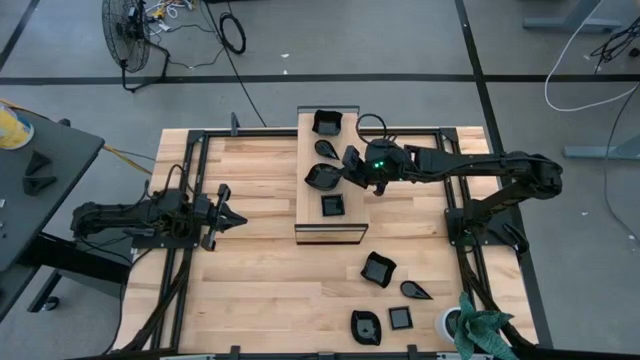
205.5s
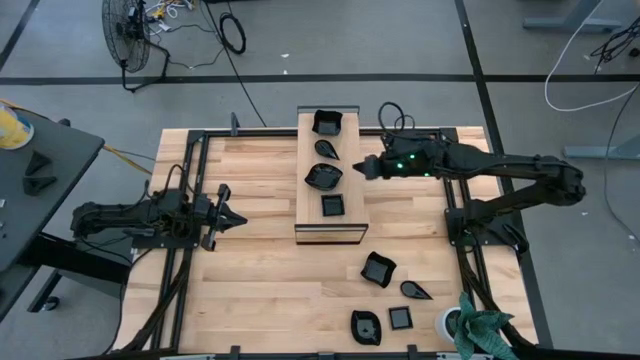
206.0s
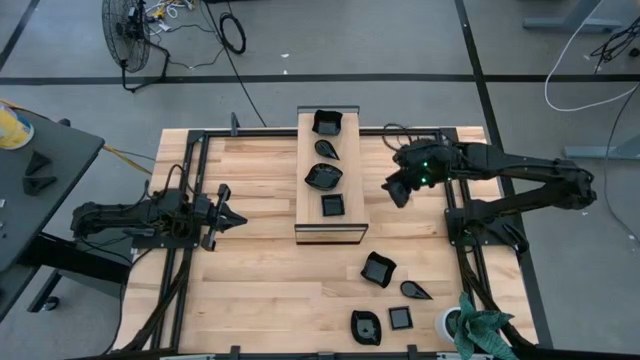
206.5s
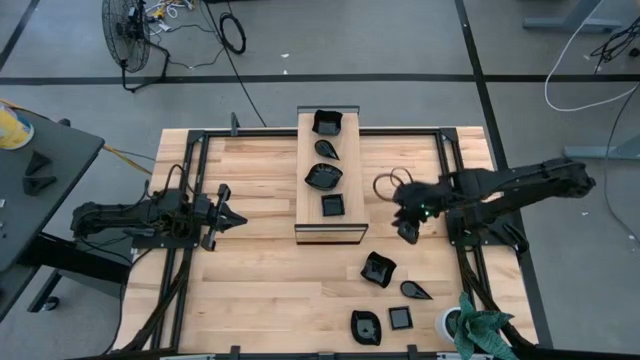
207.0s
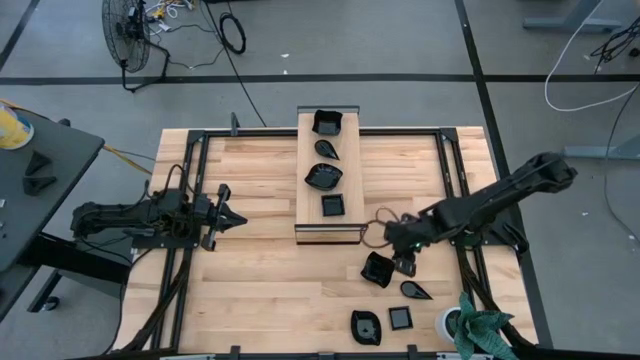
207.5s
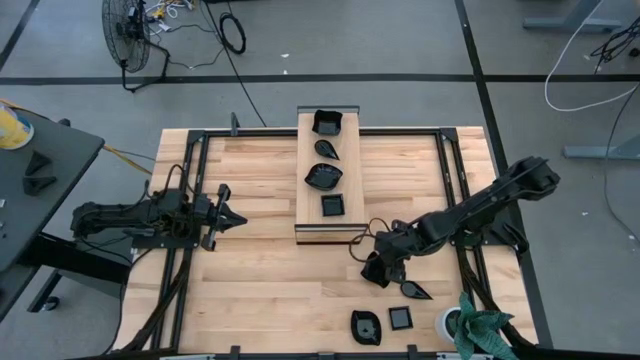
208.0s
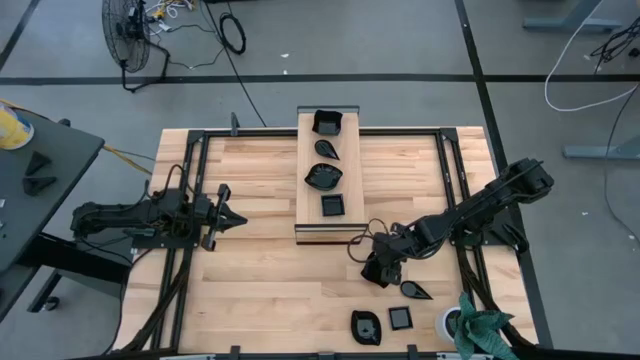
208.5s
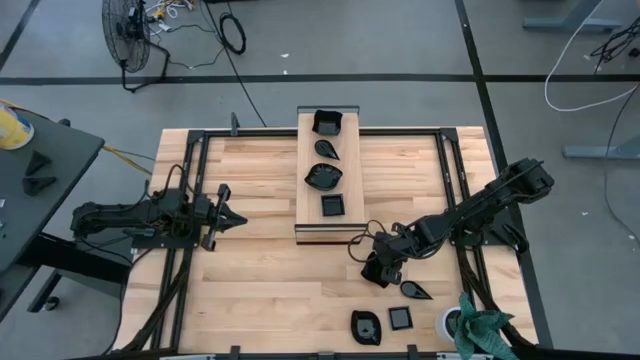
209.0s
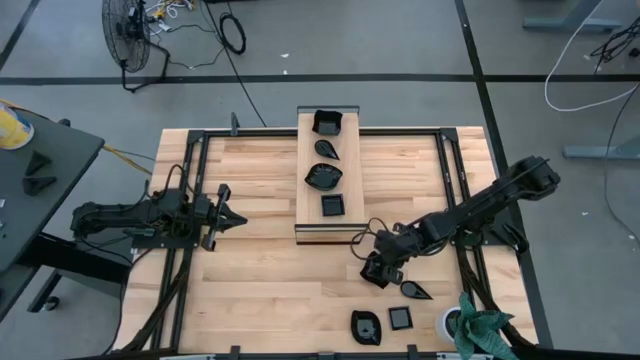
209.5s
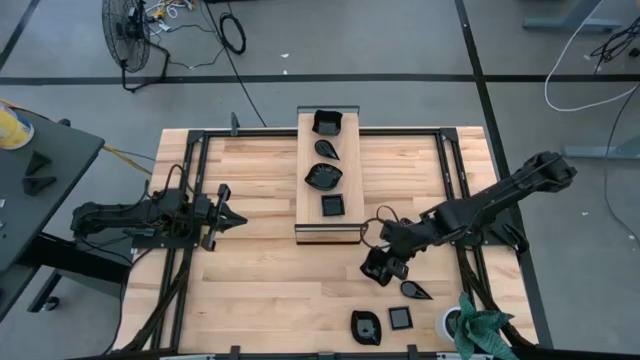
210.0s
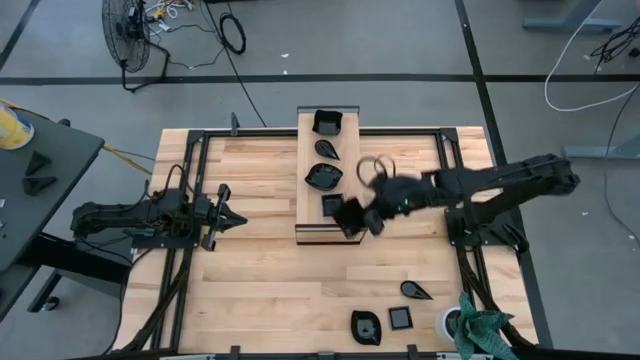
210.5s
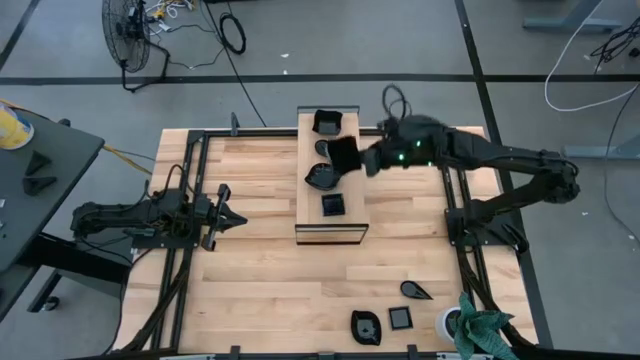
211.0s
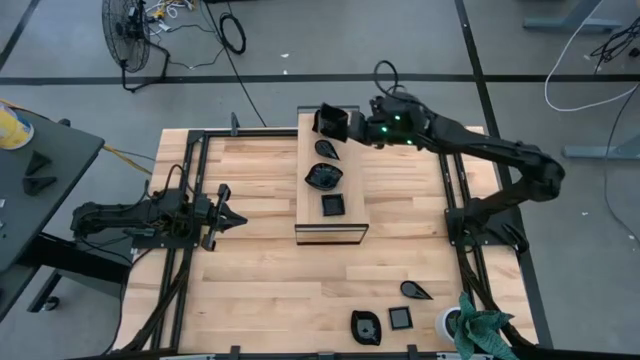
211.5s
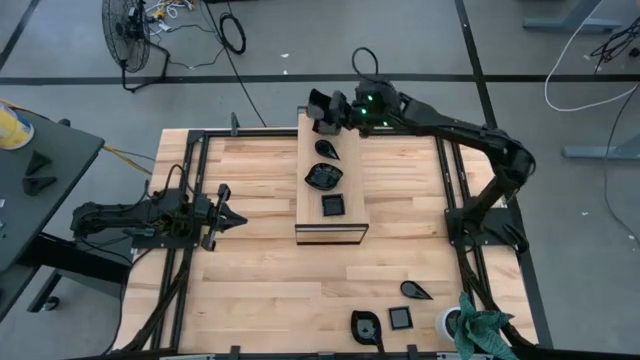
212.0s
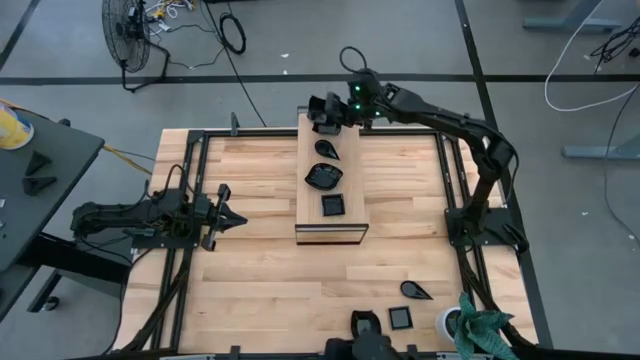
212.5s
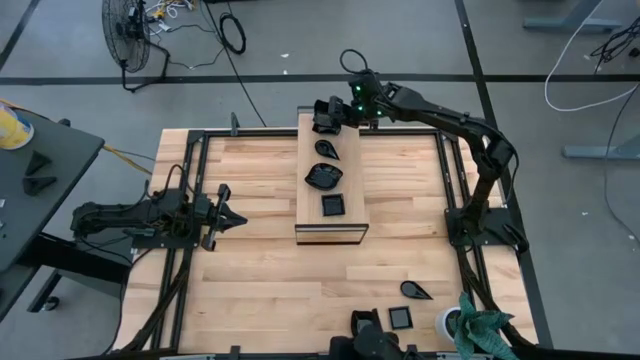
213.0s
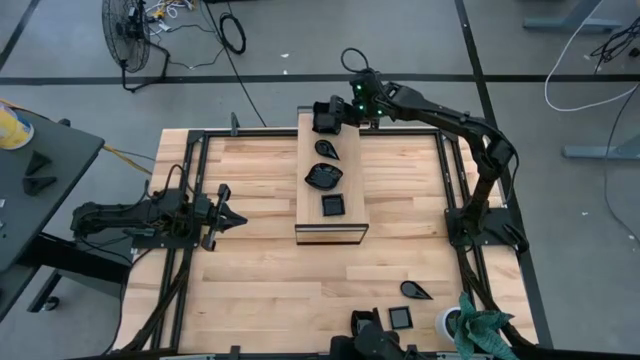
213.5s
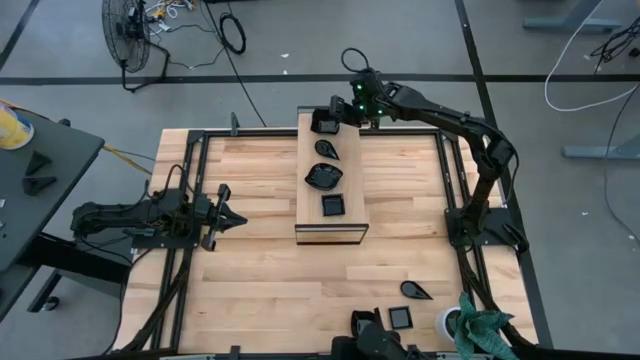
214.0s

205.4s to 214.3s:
Task: Pick & Place Mini shaped plates
Stack the distorted square plate on top of the distorted square plate on the shelf

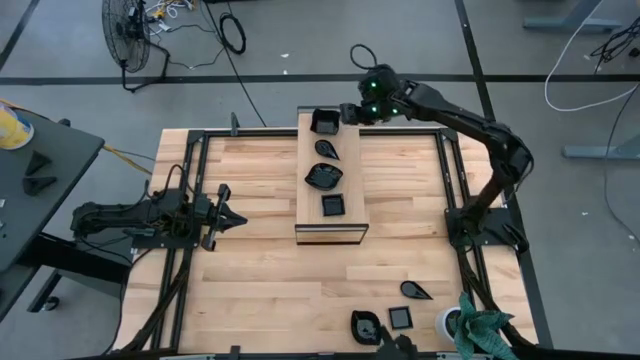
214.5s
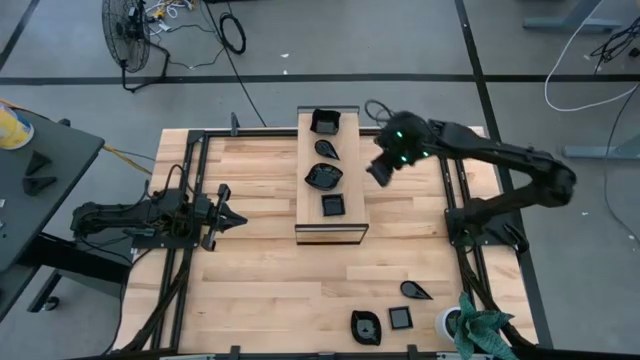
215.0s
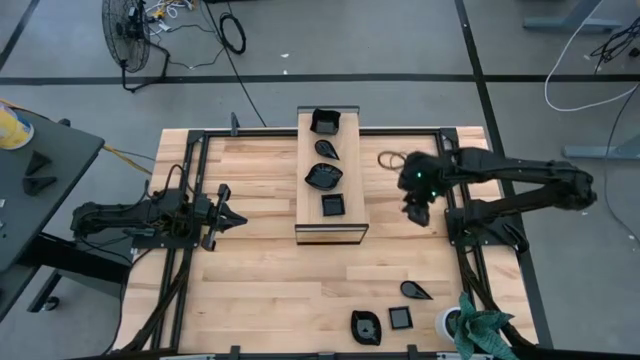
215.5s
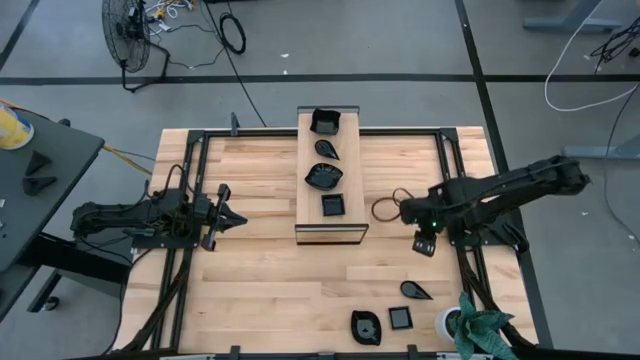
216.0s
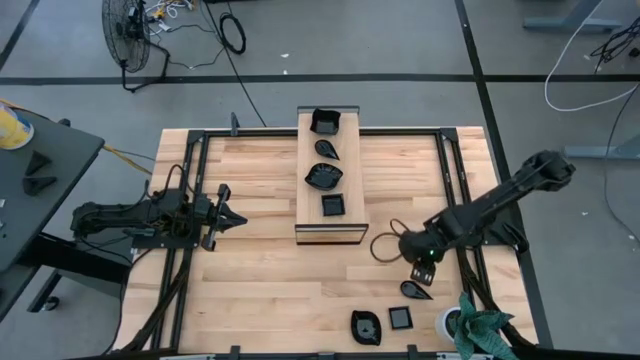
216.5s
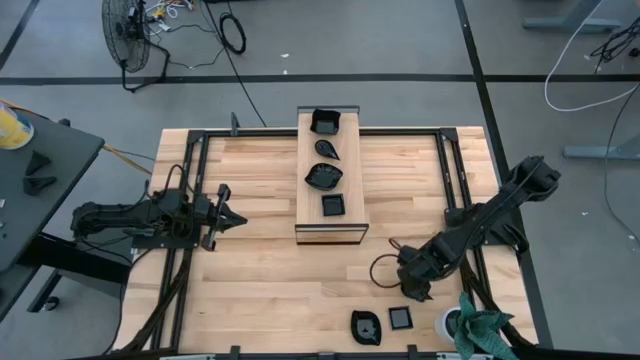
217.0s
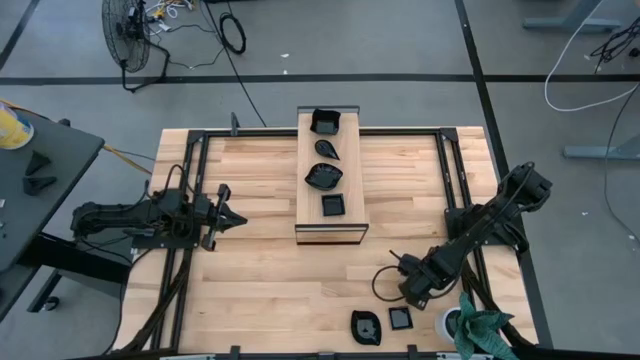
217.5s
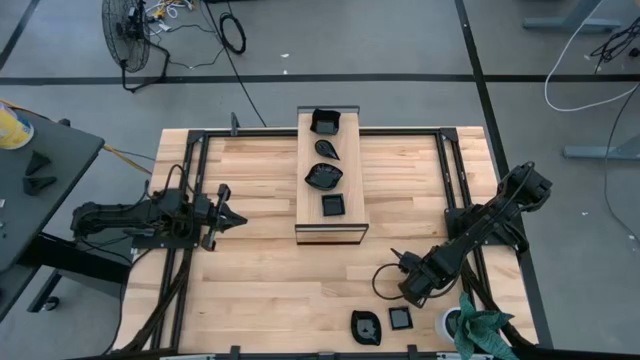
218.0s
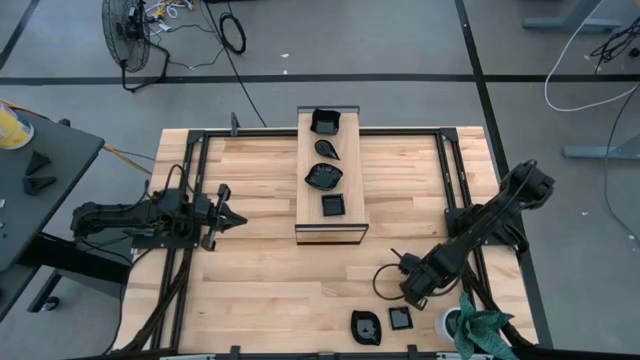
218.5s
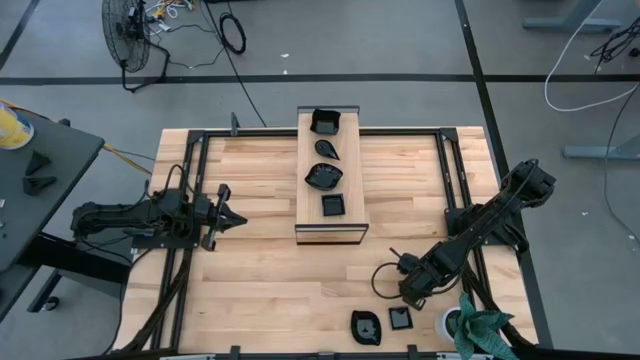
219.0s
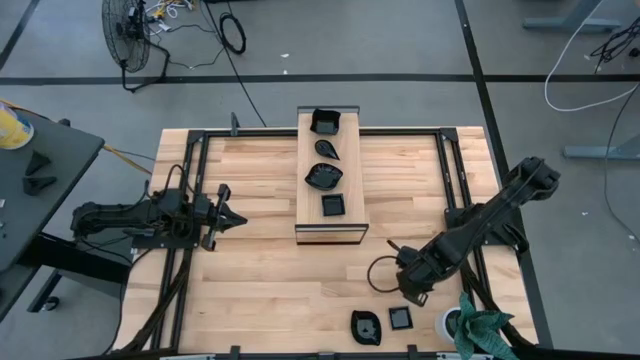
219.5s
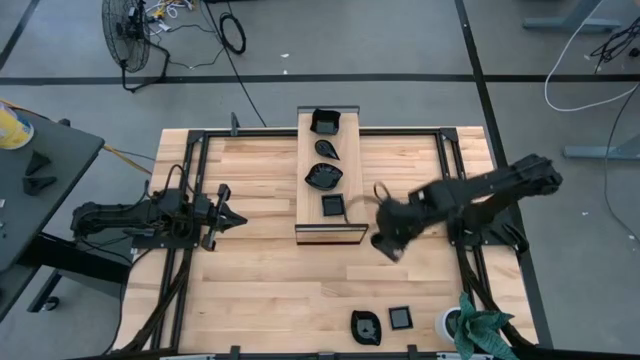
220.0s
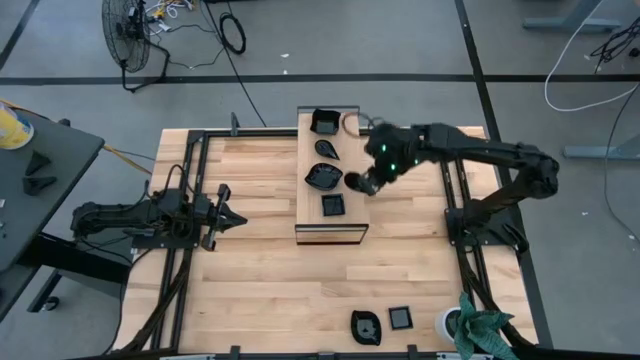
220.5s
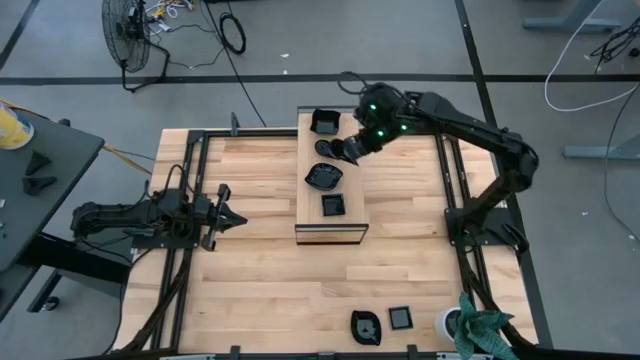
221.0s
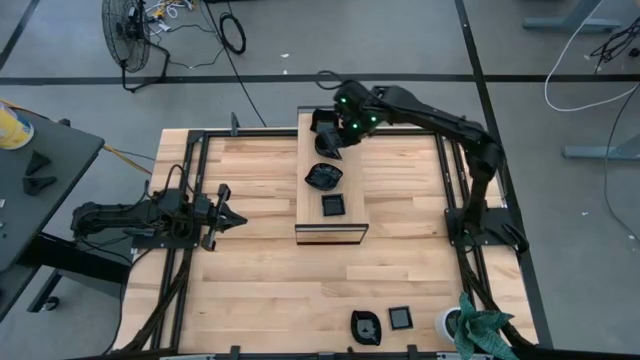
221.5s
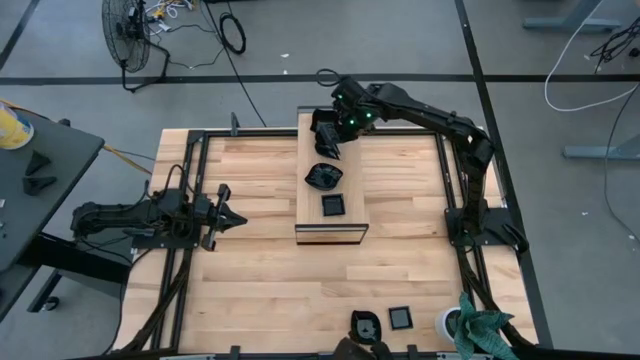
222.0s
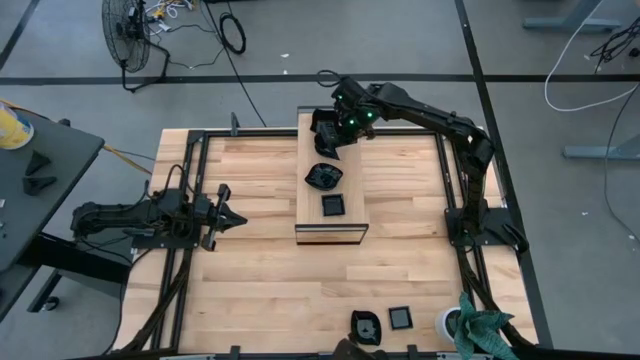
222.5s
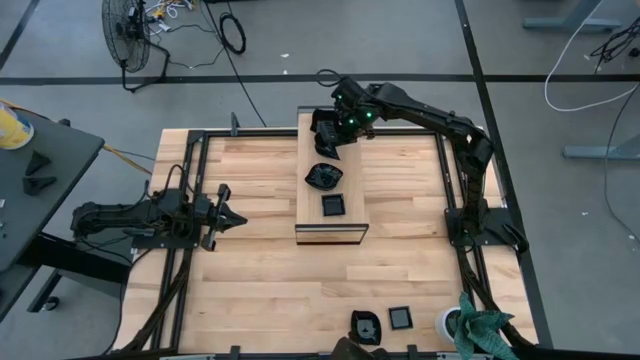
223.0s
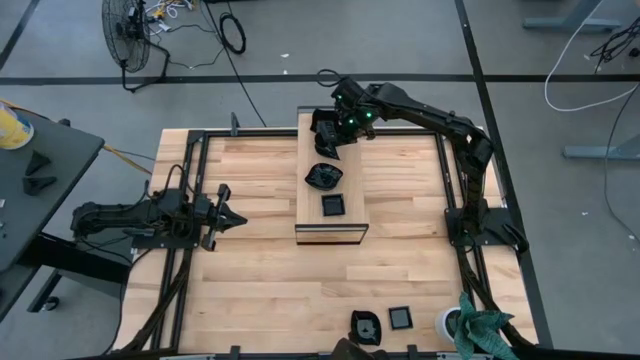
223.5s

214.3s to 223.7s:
Stack the drop-shaped plate on top of the drop-shaped plate on the shelf

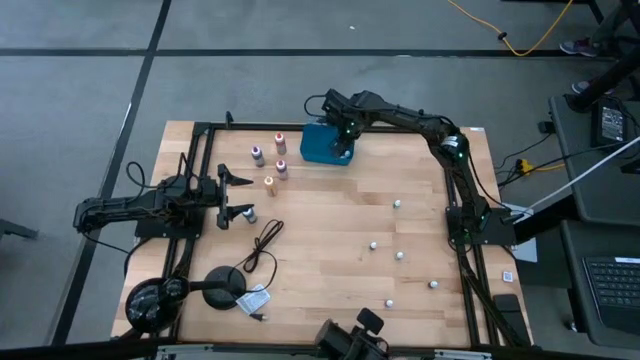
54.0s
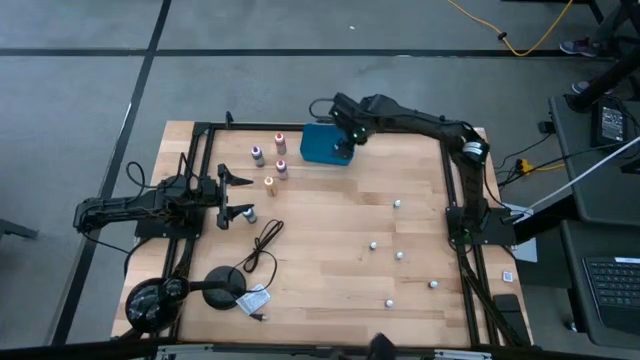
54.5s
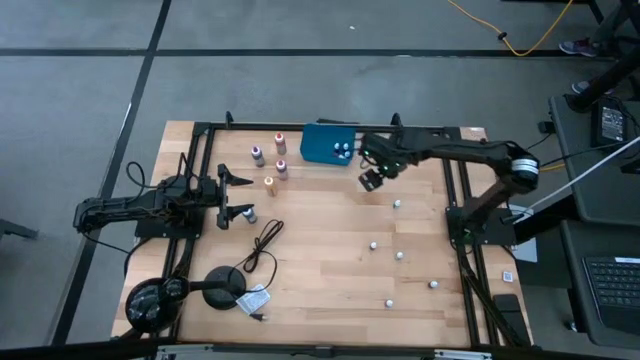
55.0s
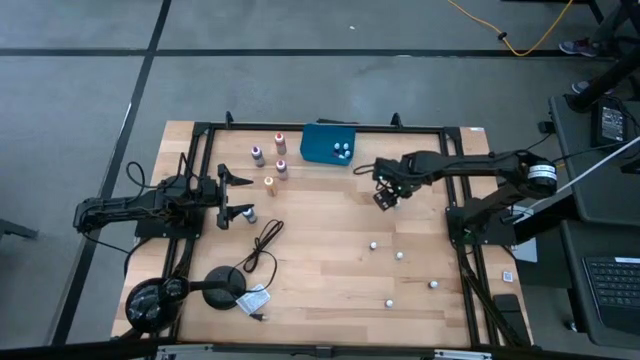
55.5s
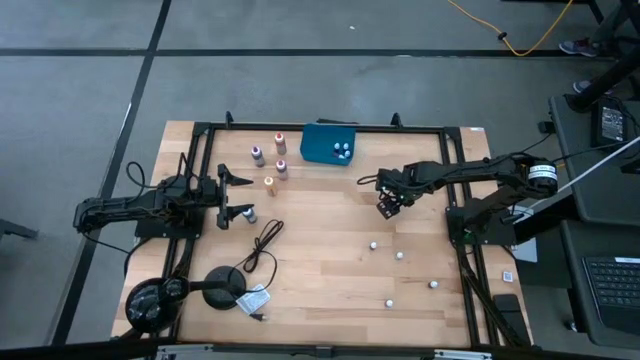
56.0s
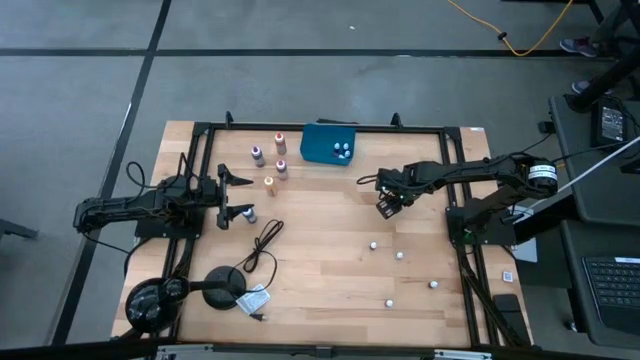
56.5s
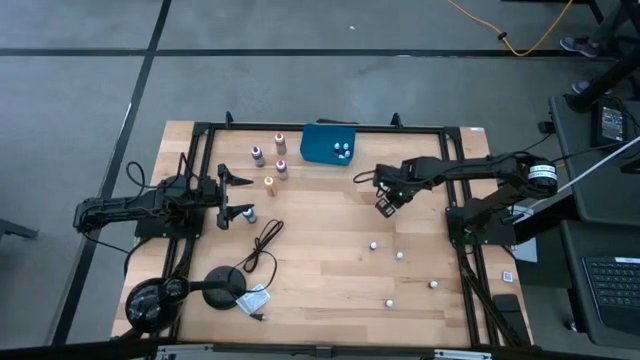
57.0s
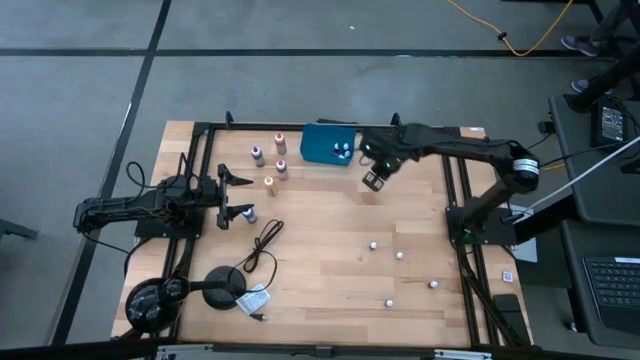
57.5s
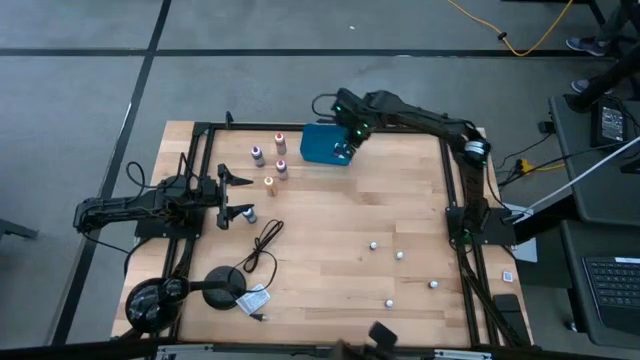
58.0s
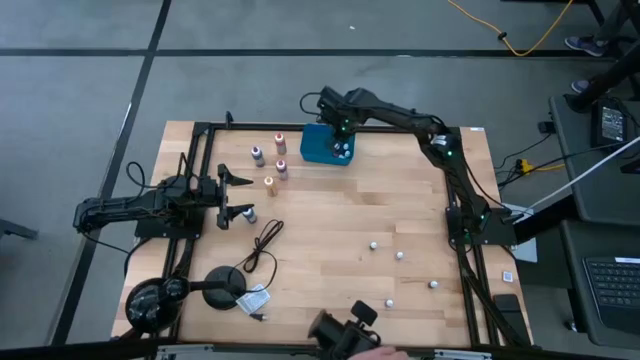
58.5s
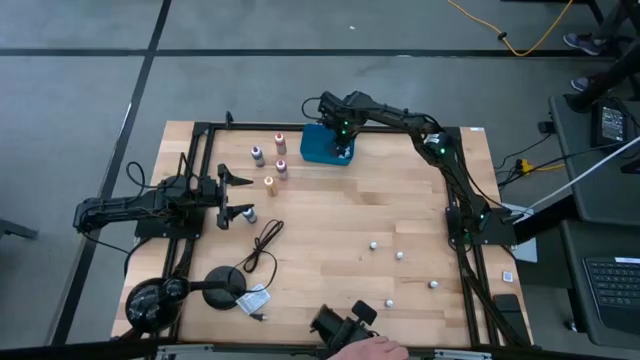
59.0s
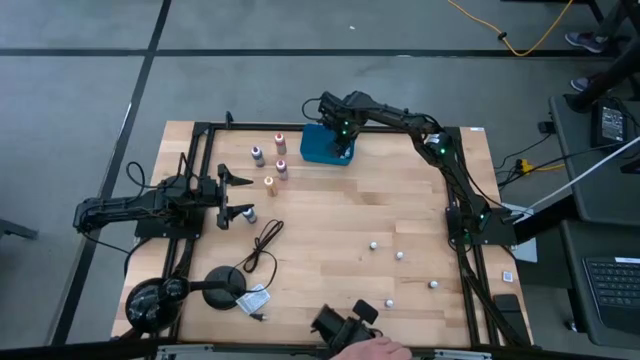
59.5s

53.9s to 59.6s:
Task: Pick & Place food coloring
Put the small green food coloring bottle into the blue container
